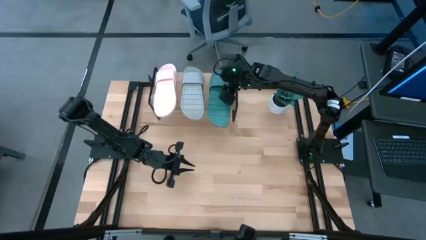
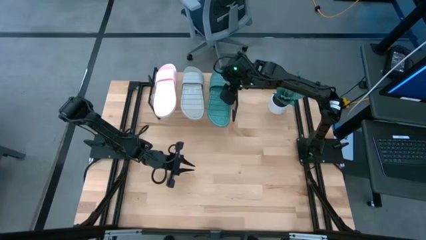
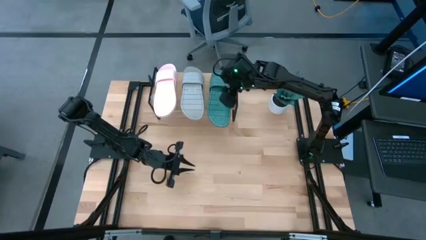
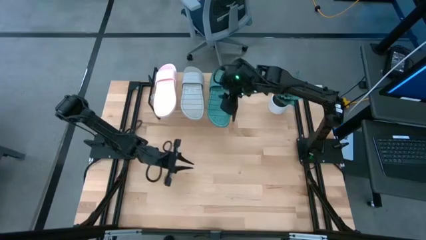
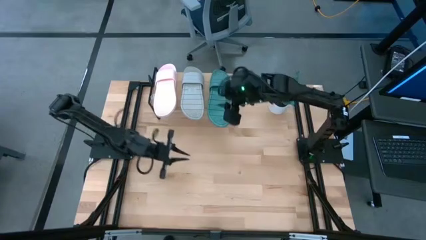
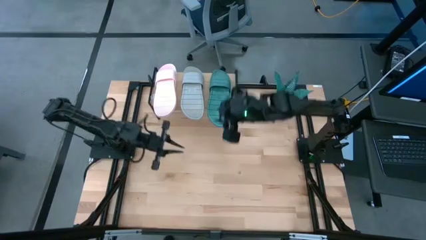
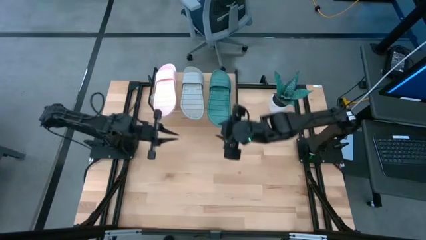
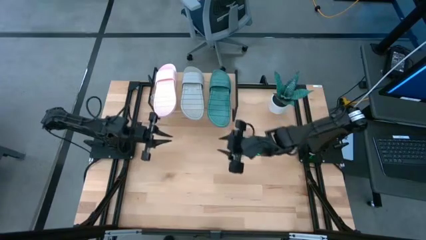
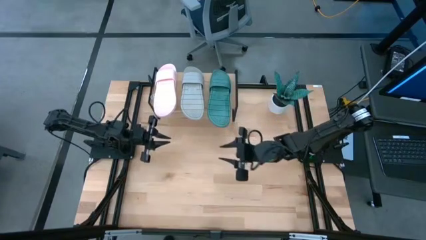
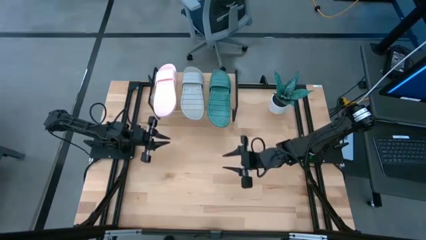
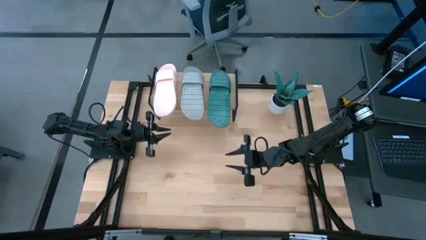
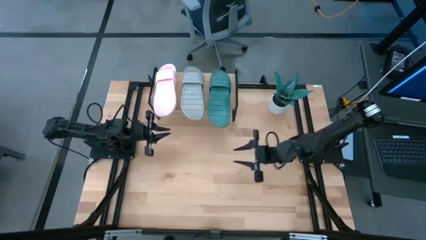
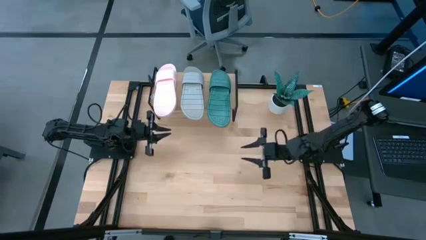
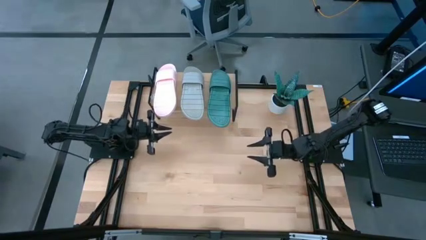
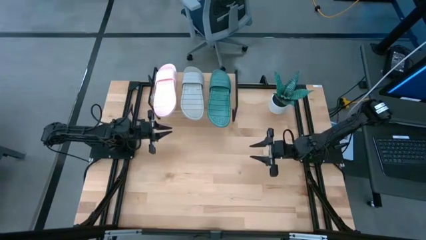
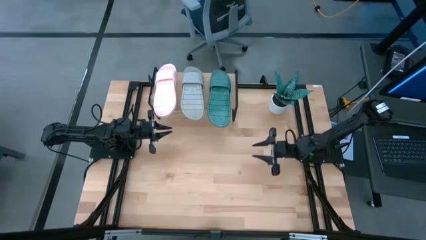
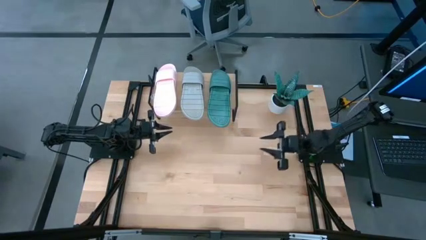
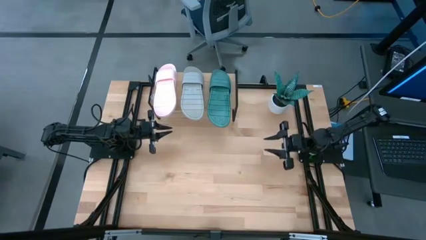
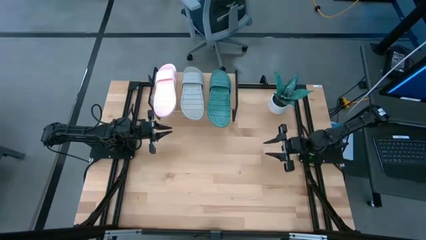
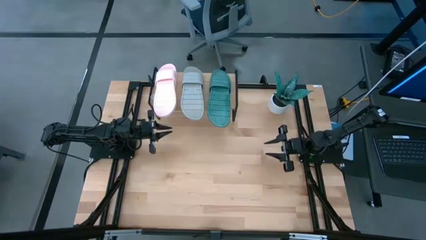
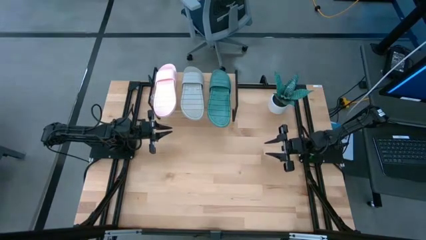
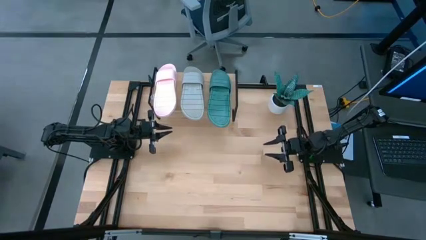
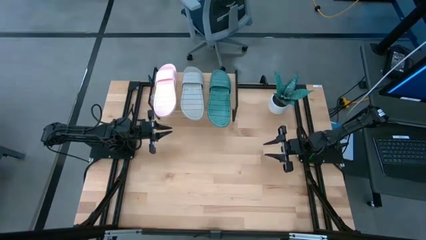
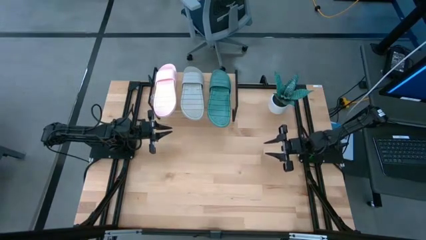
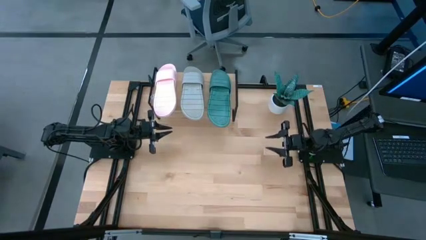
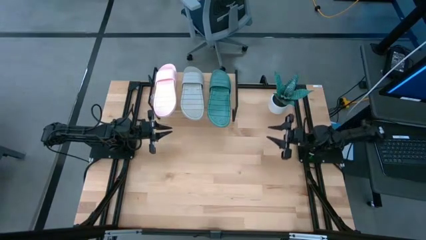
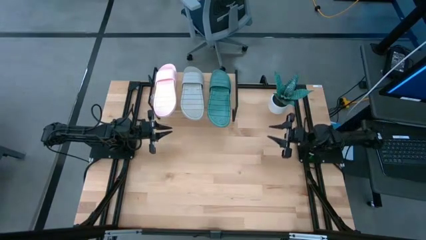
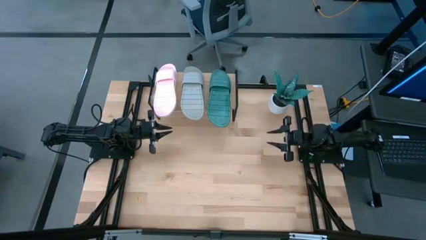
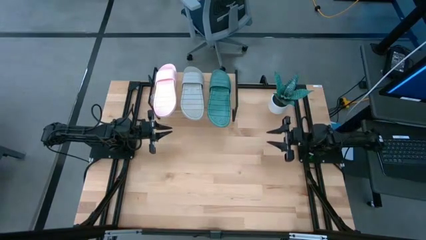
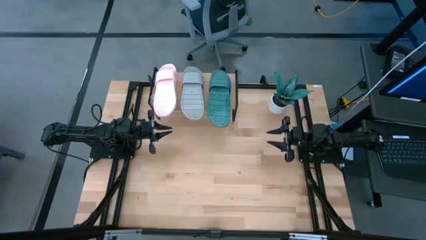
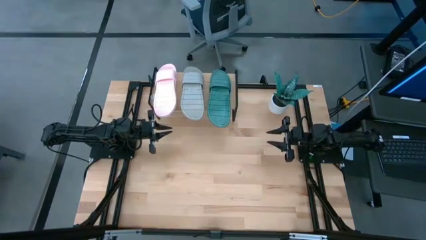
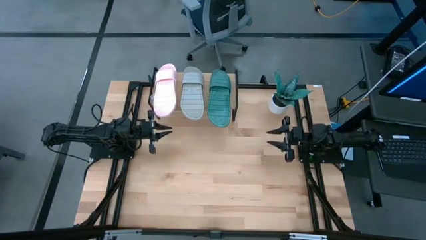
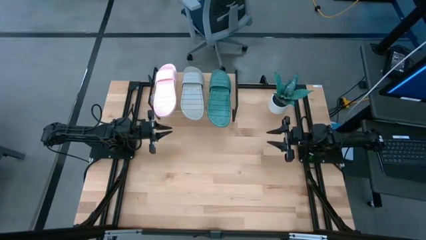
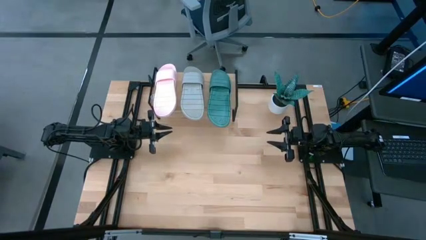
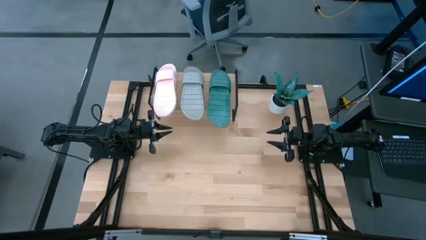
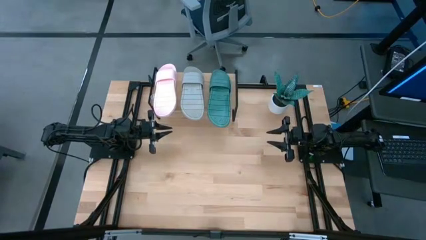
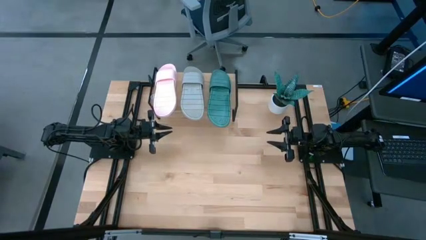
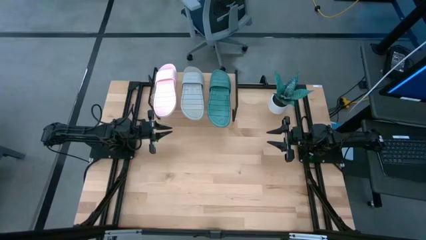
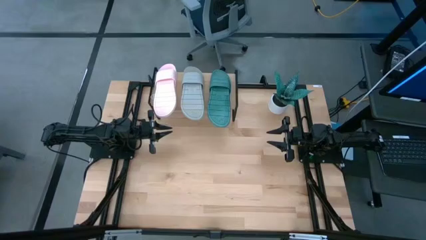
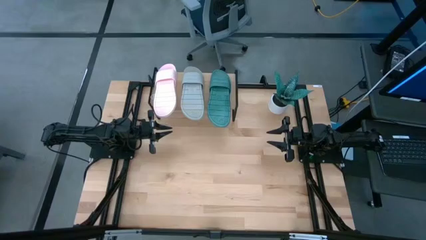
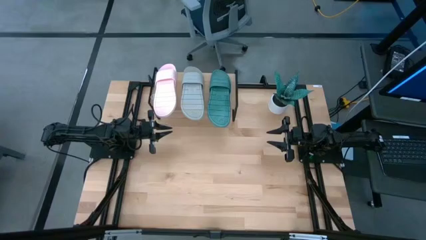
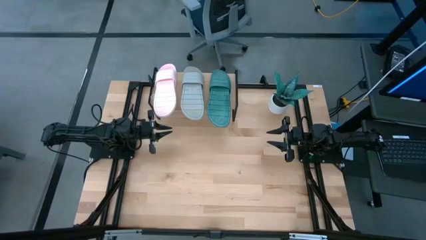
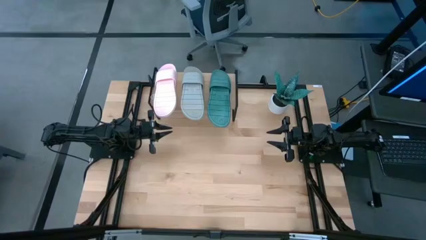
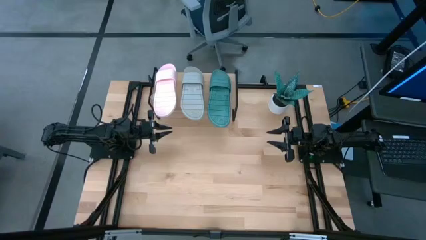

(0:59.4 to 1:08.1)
Task: Pick and place slides into the shelf
Return to Home Position

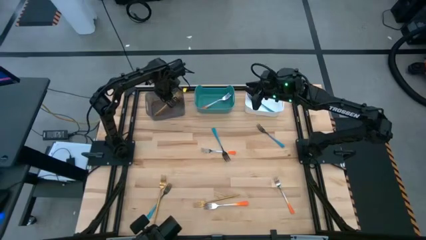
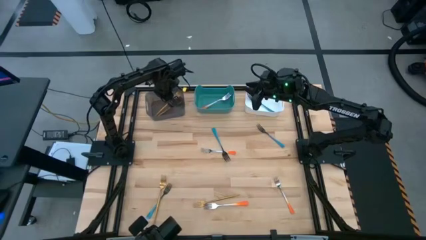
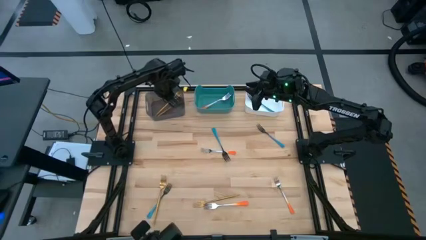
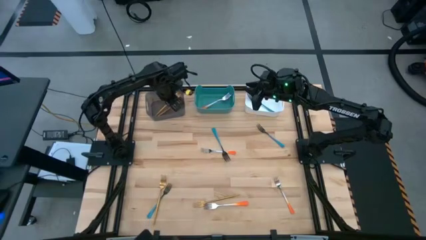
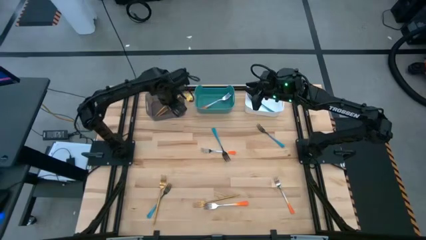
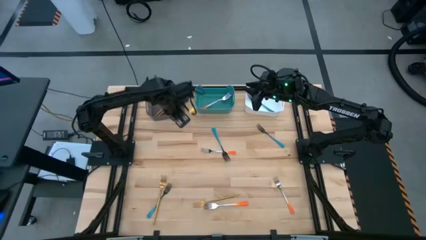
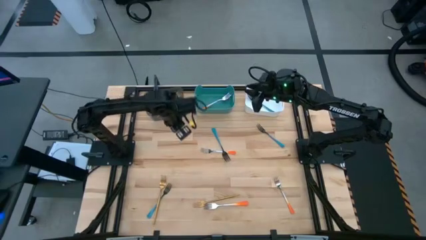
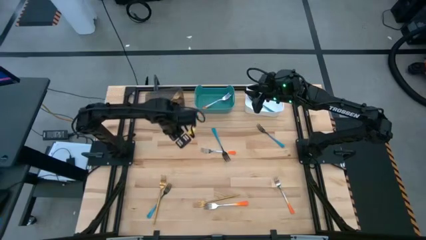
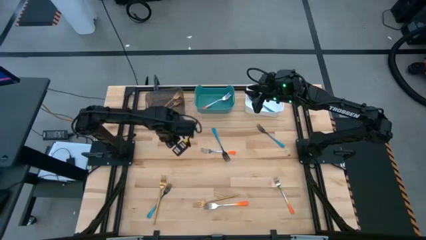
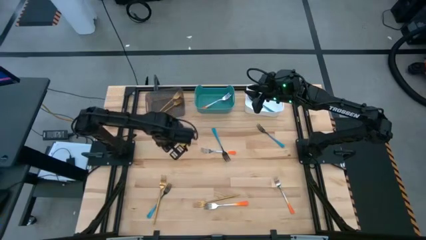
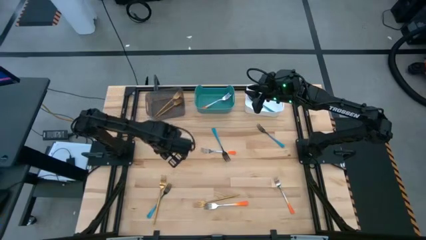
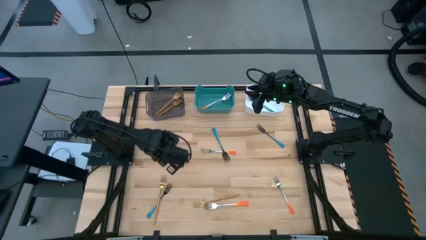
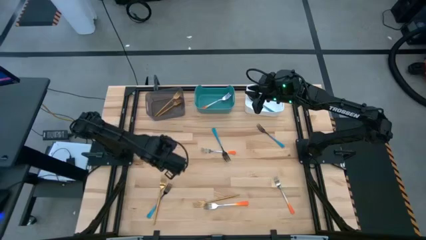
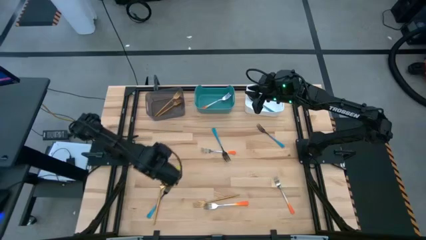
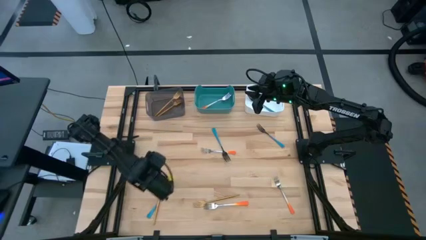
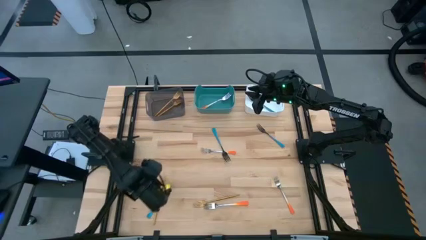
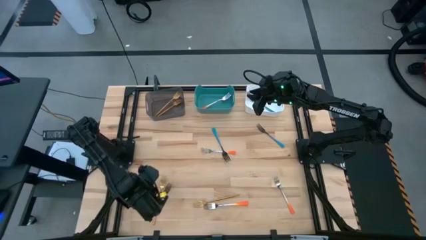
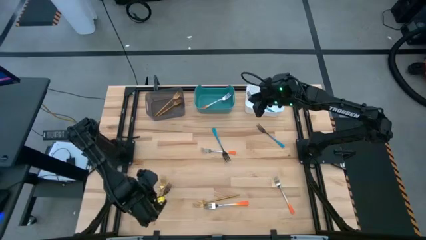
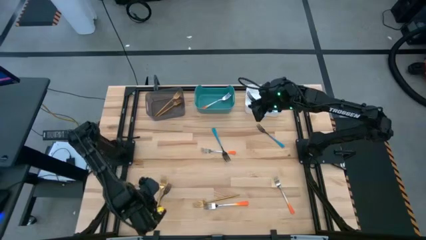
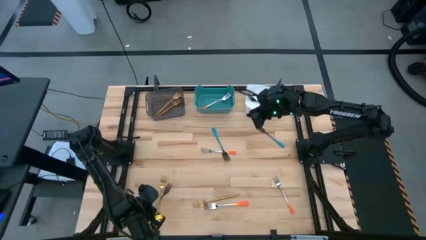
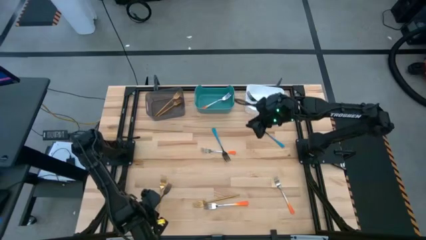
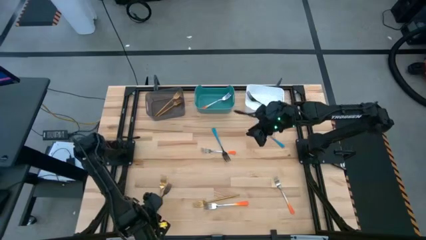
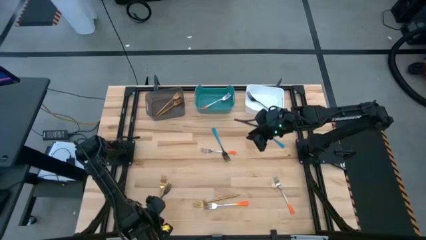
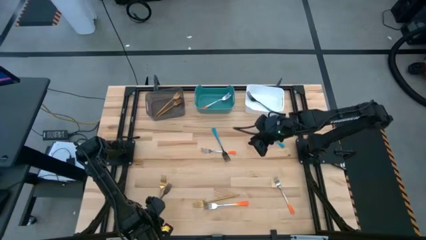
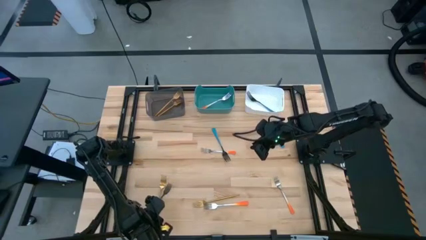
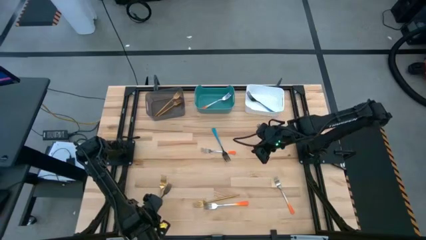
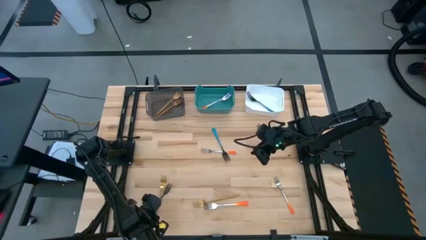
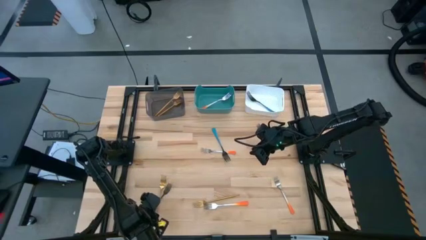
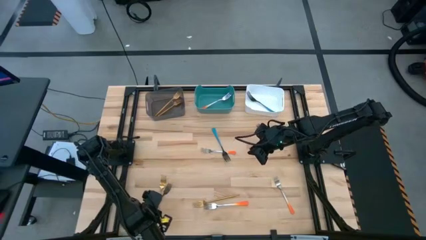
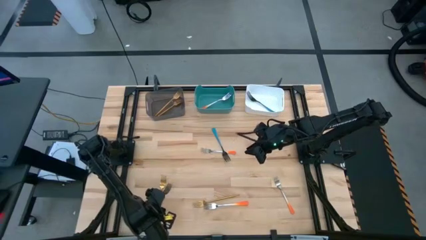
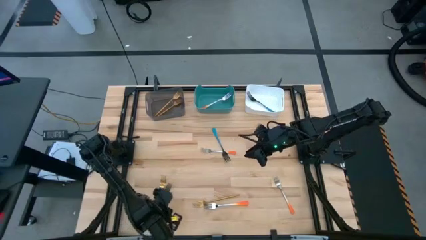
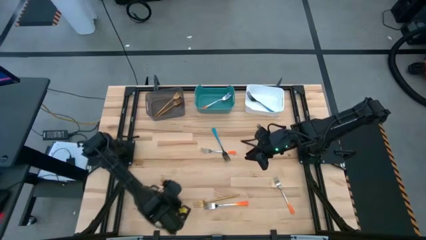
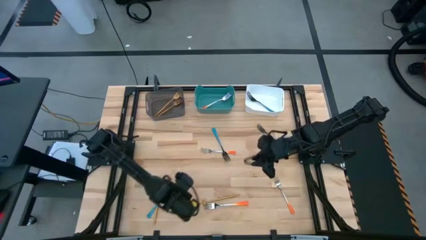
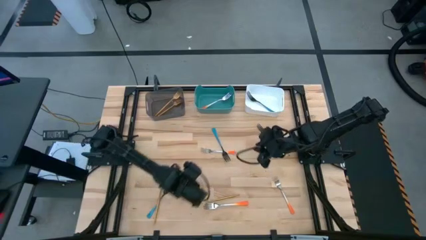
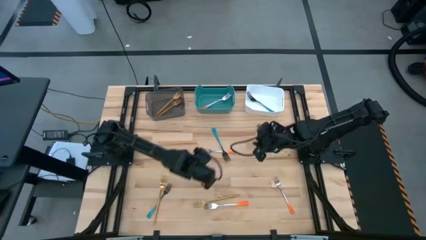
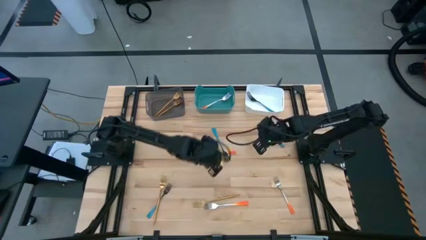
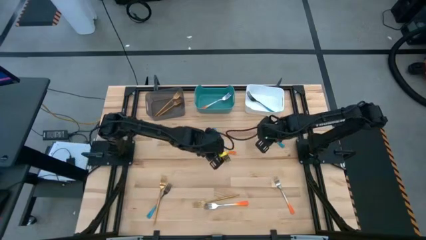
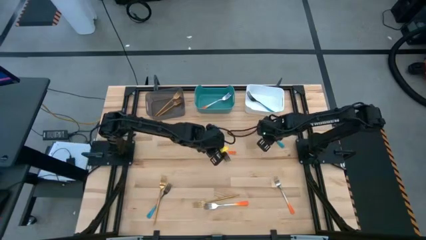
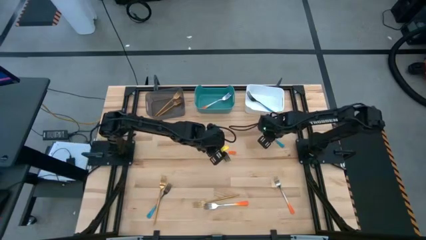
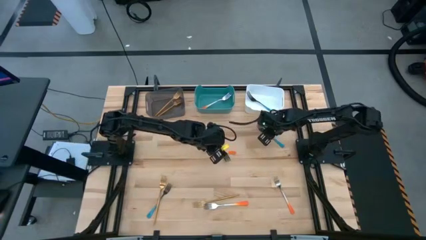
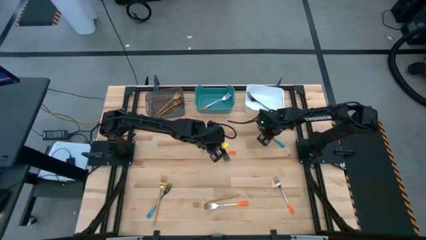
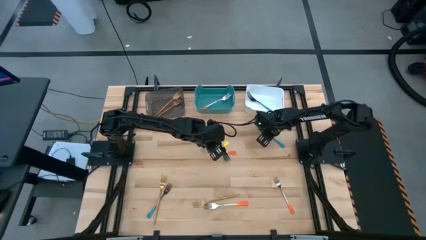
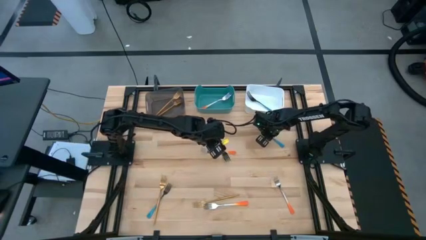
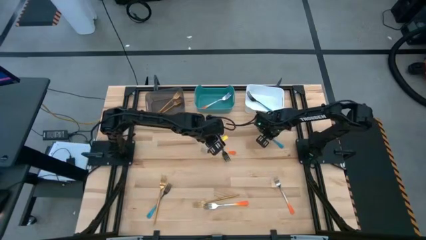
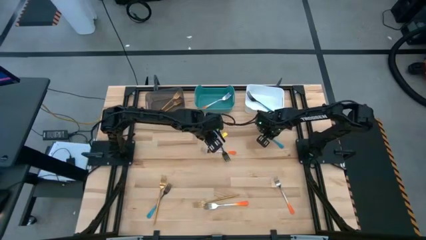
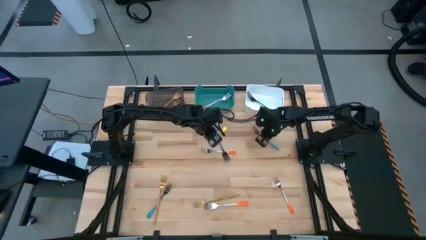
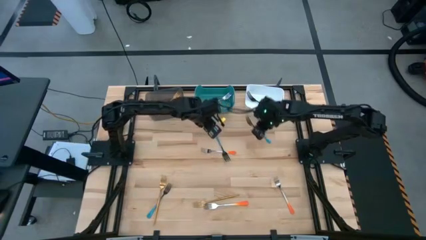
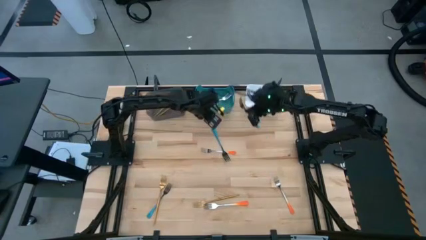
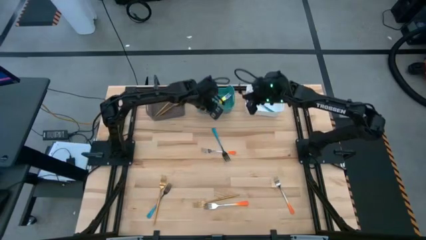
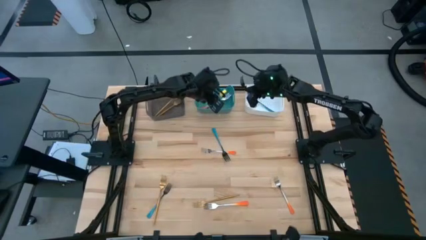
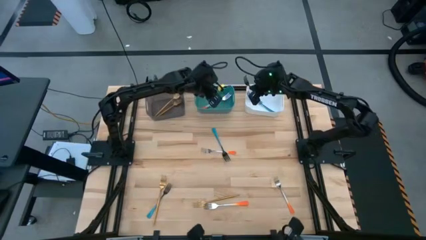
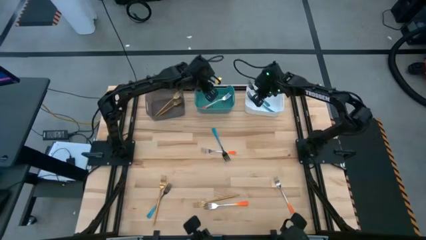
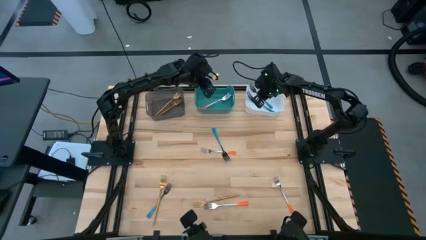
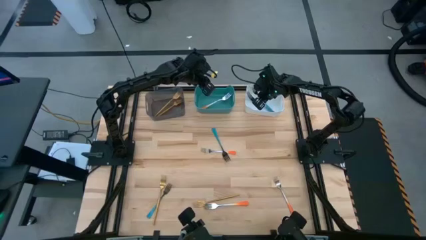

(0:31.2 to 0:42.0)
Task: Sort silverware by color (type)
Put the blue fork into the white bin
